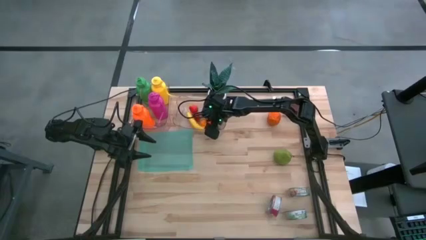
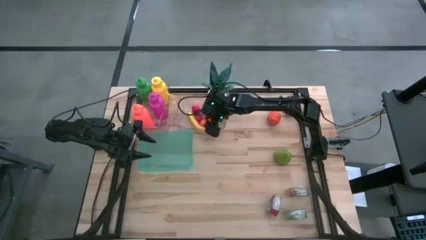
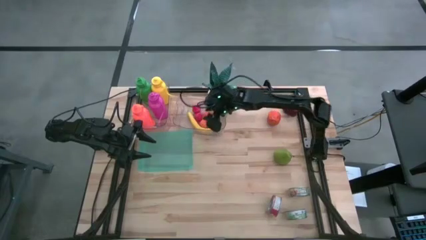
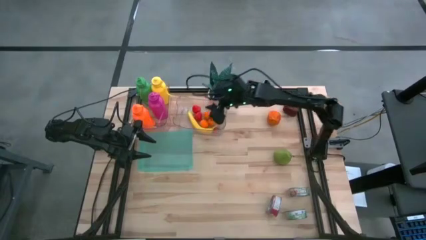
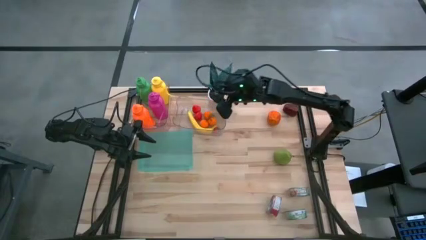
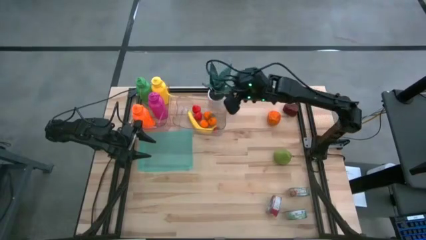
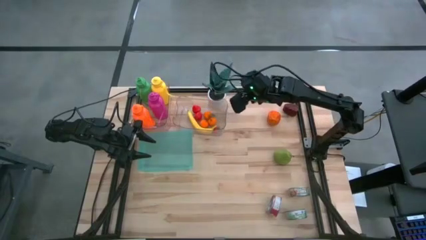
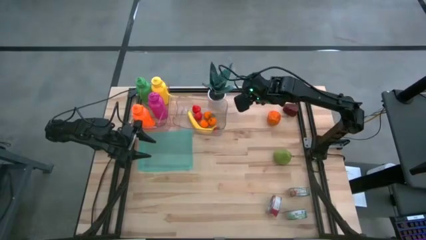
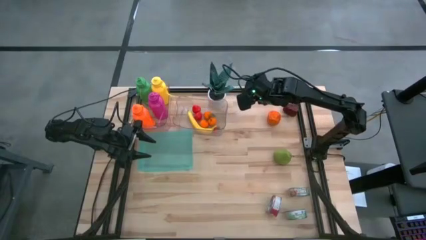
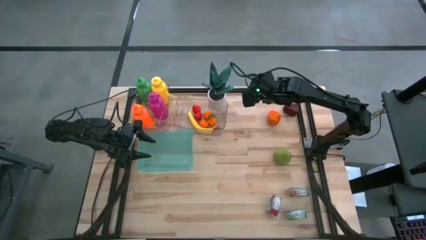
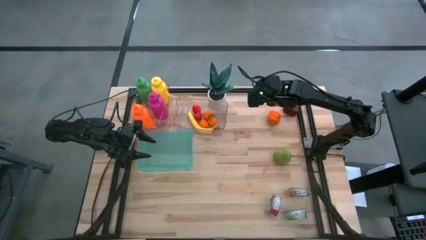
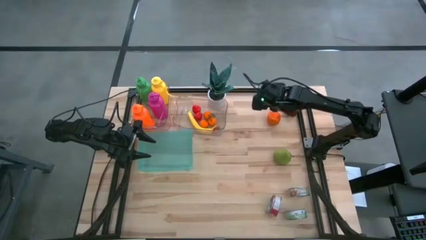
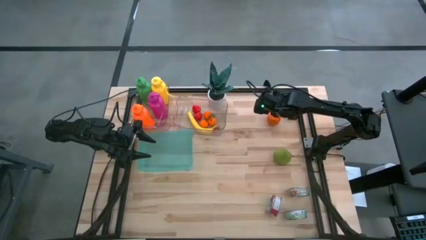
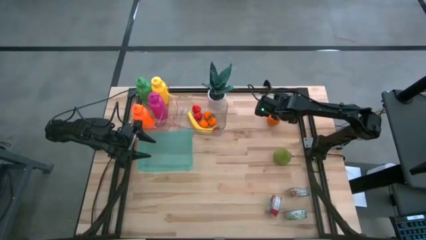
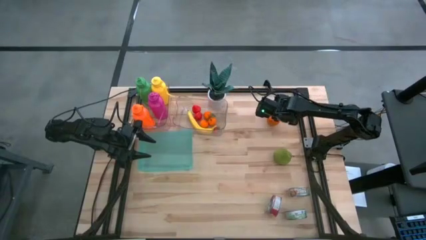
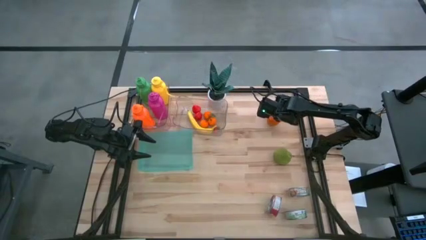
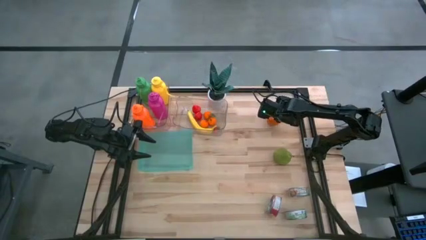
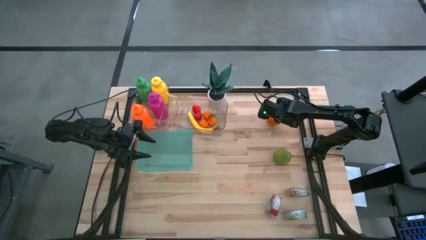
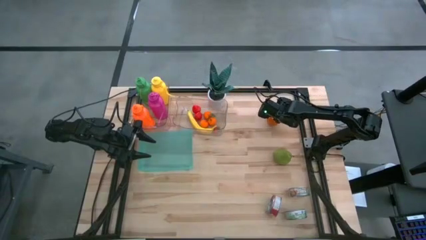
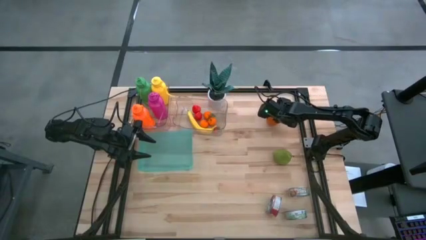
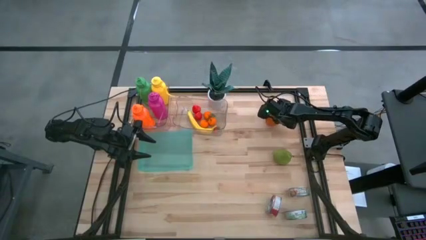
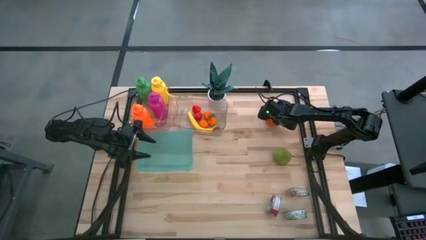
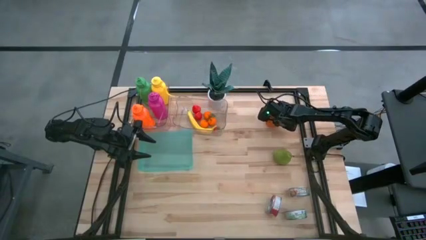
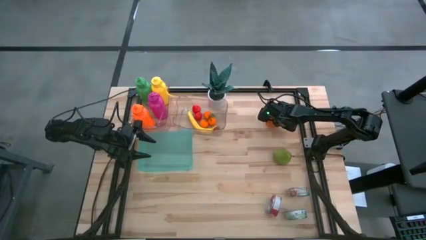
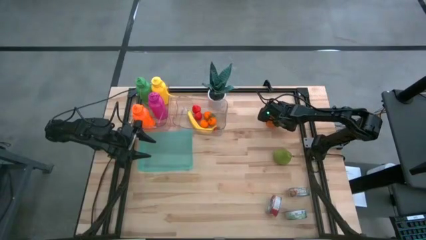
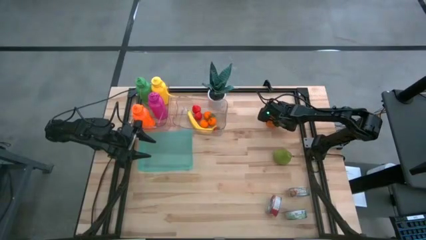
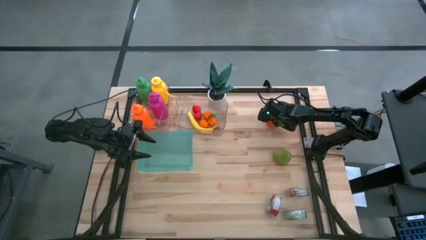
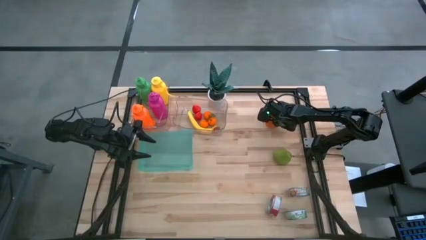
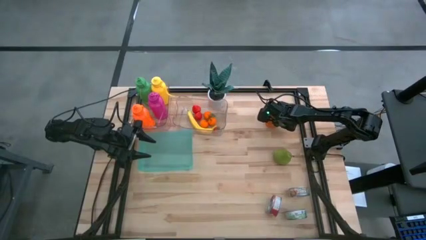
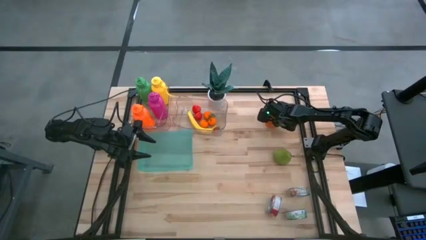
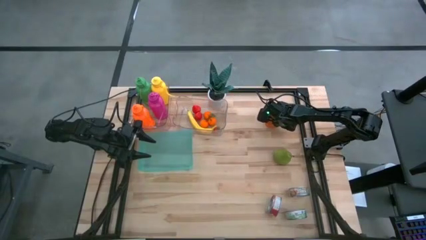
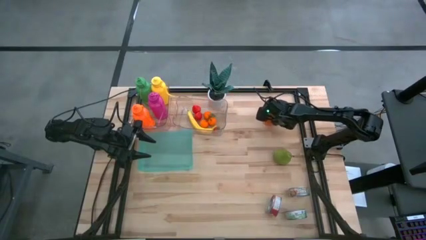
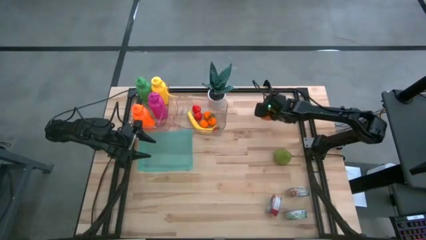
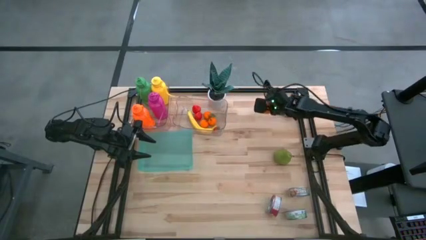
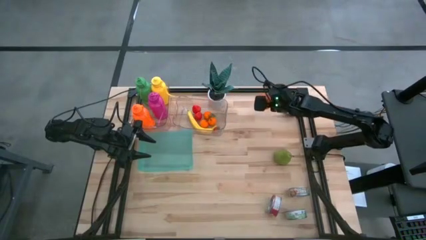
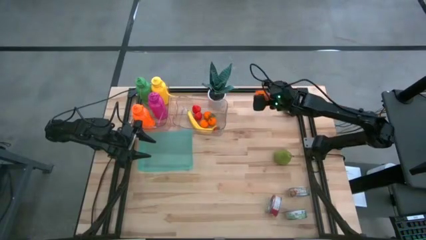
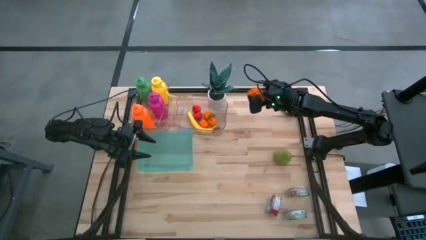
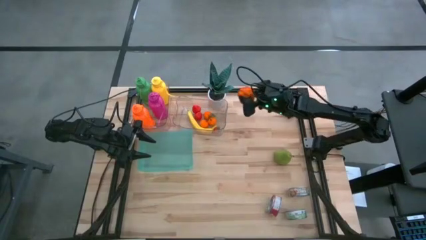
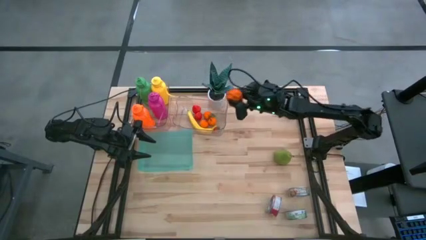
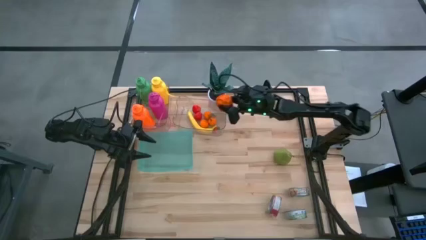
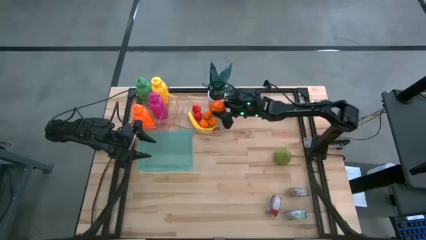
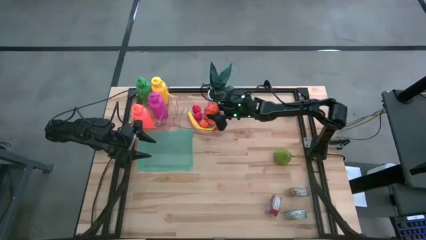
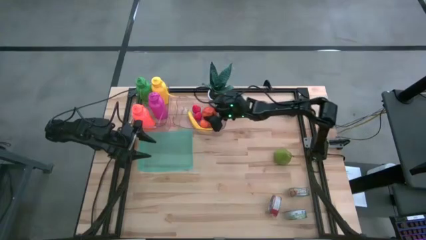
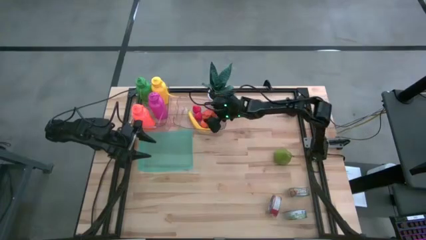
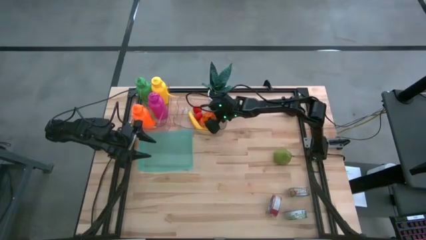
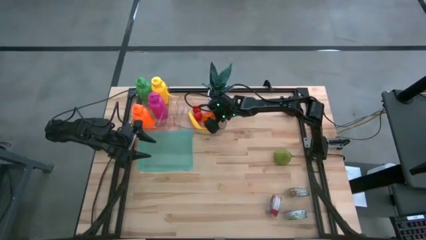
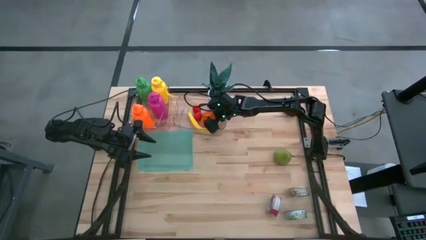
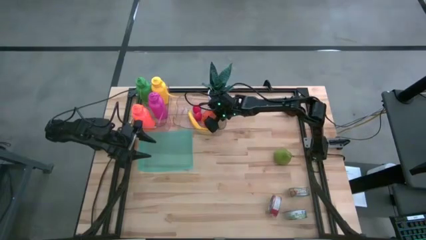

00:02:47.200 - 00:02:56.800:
Task: Pick & Place Food Item
Put the orange into the right transparent bin

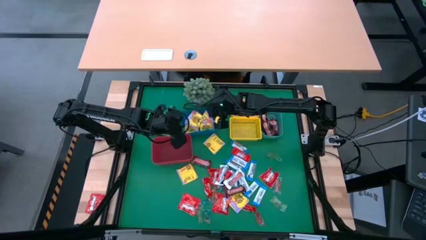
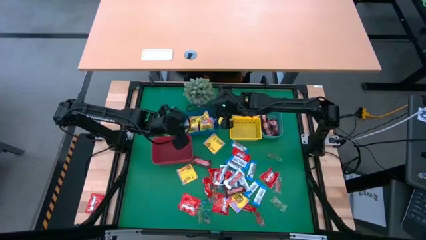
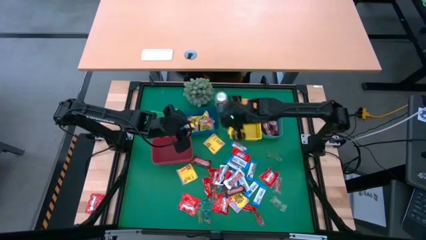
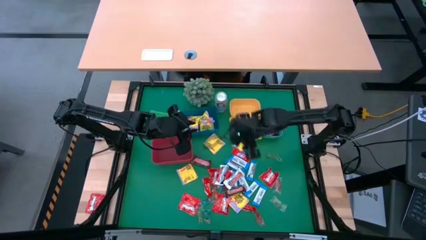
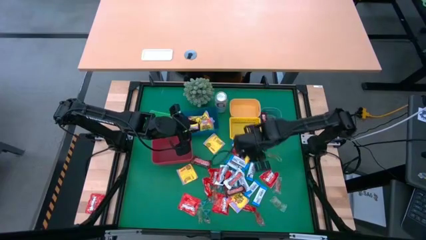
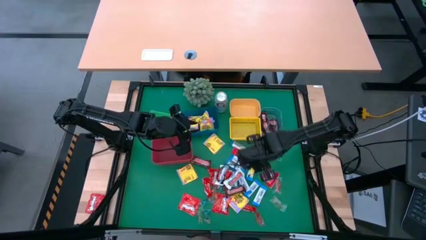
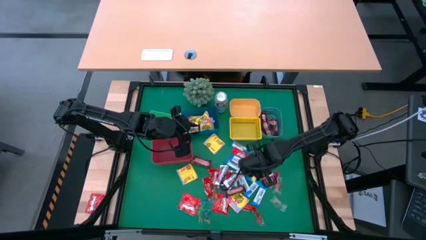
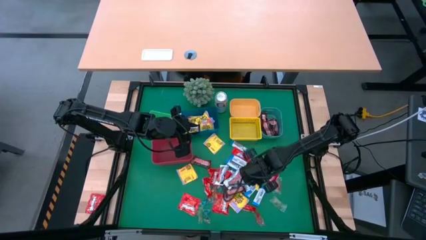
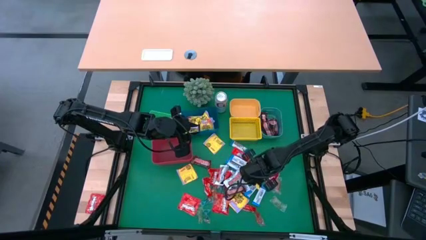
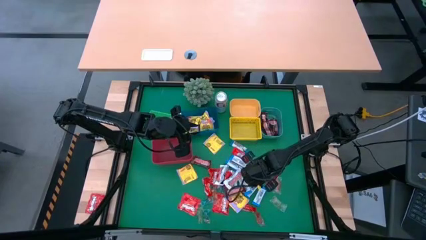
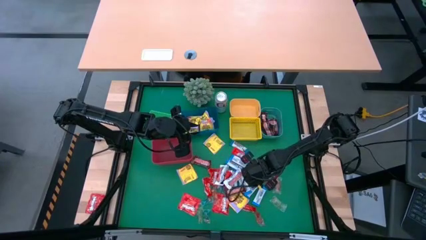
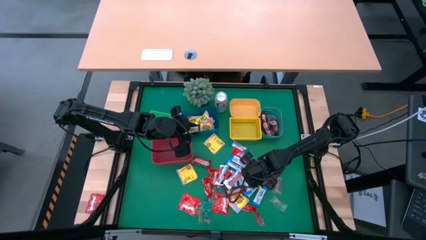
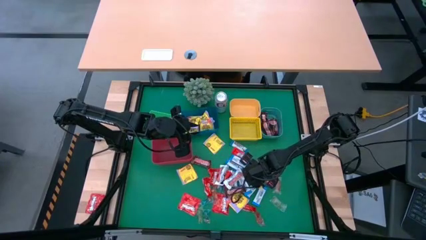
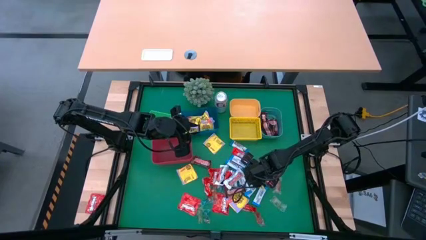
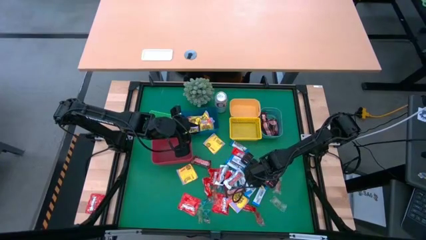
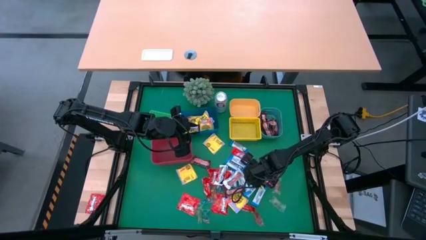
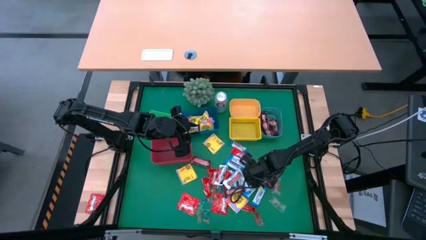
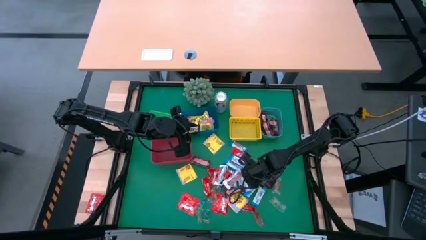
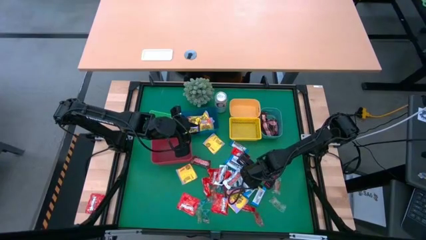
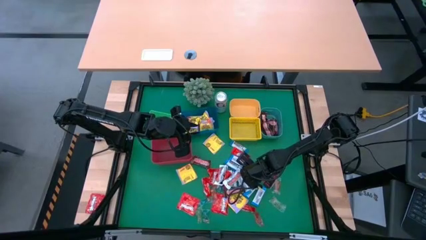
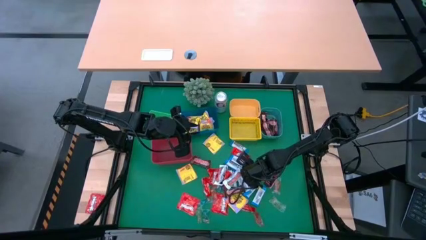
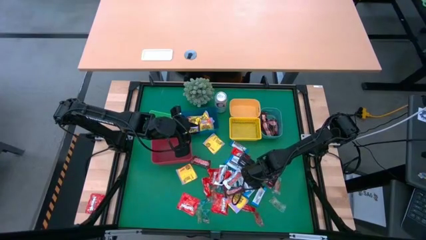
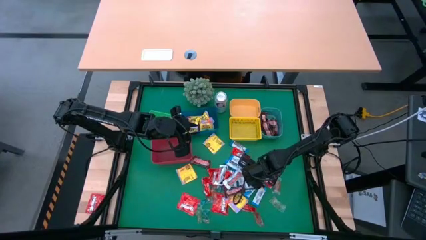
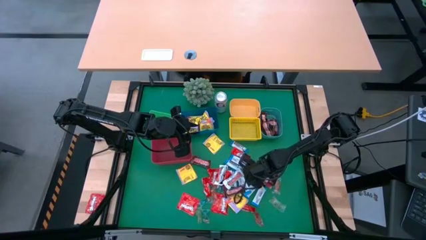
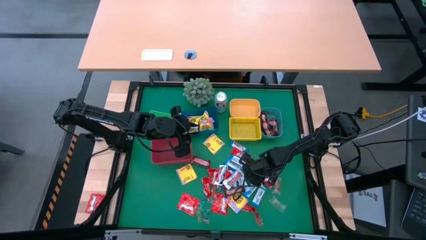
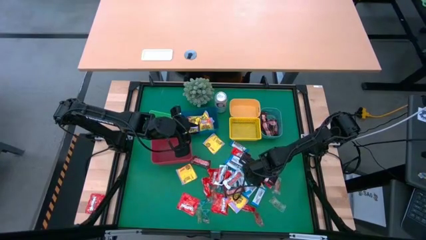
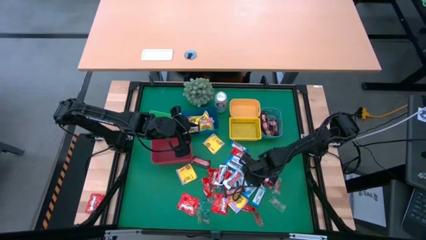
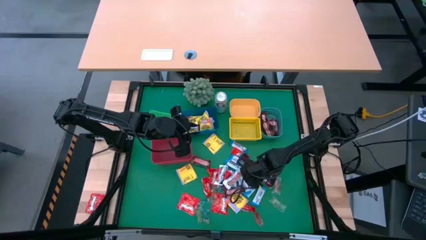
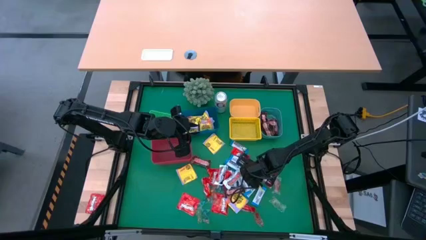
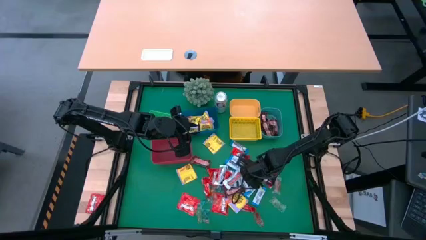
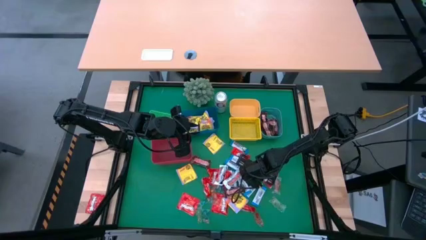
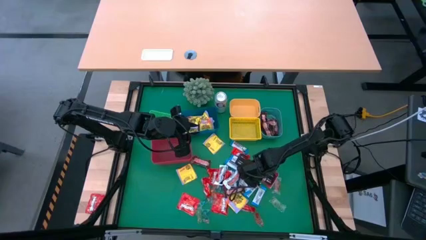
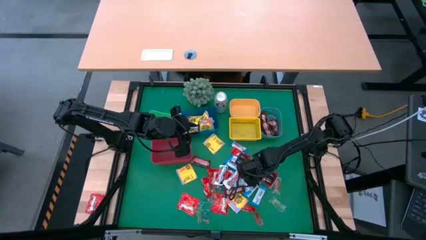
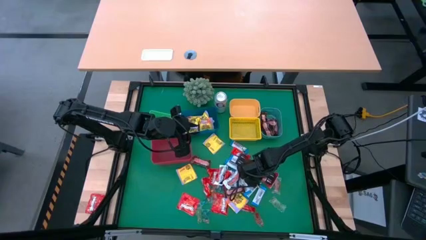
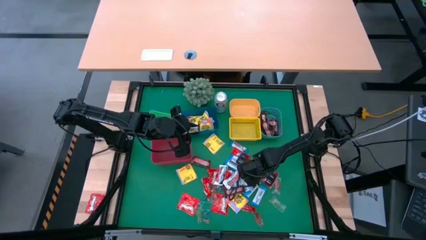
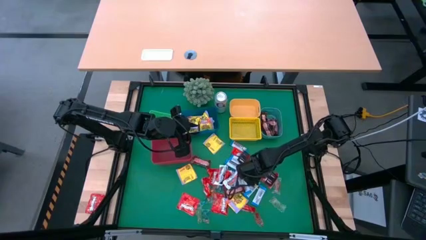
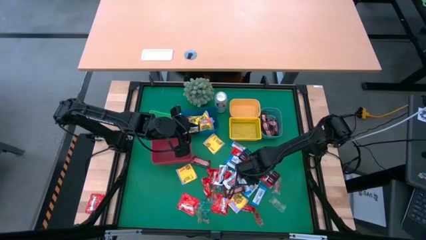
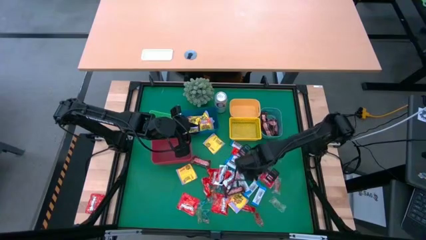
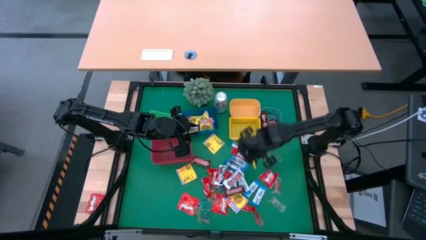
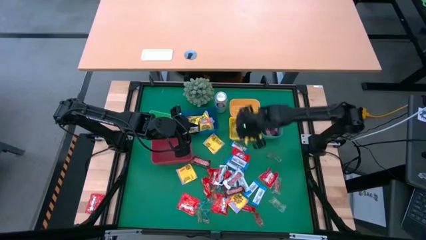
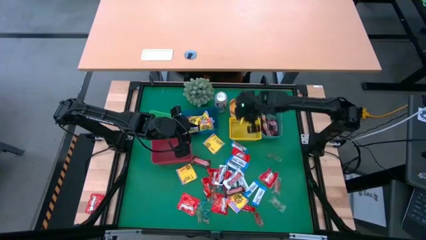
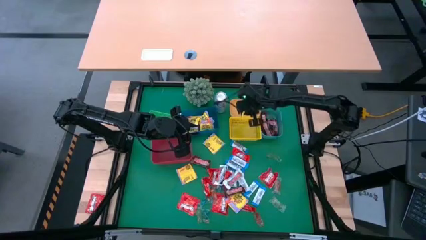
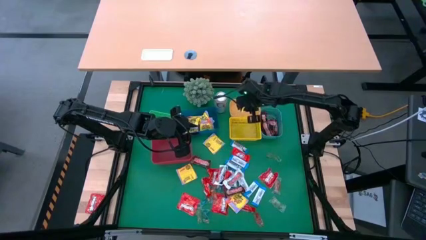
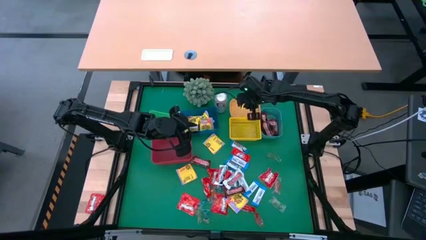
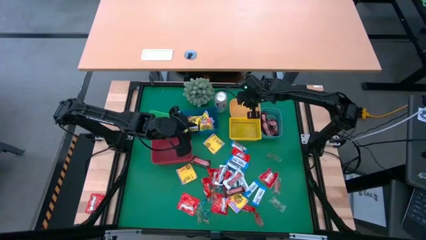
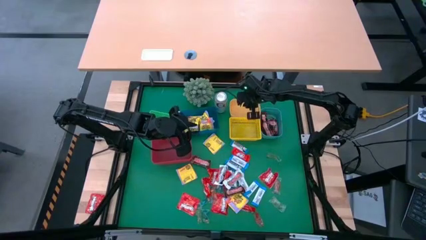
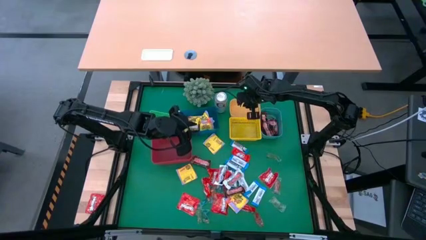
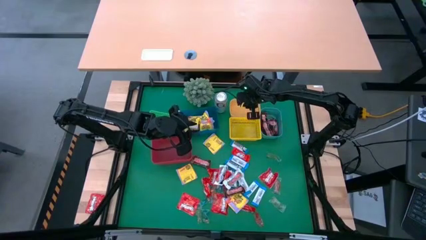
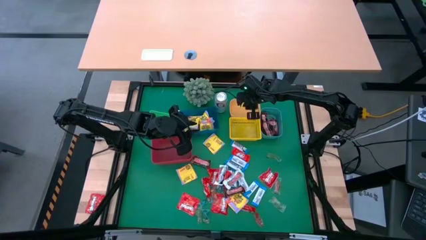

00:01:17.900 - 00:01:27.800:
Task: Sort candy
Put the blue chocolate bar into the orange bin
